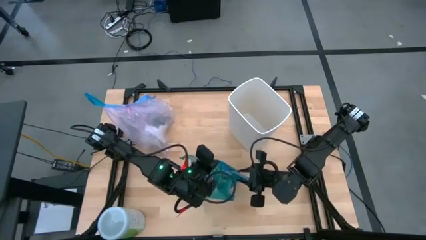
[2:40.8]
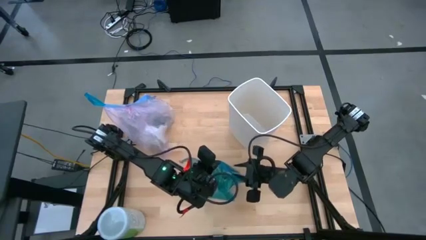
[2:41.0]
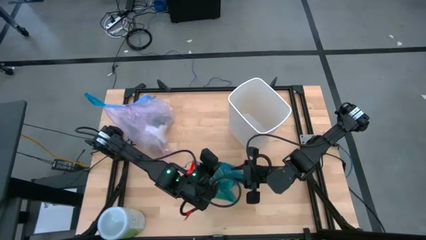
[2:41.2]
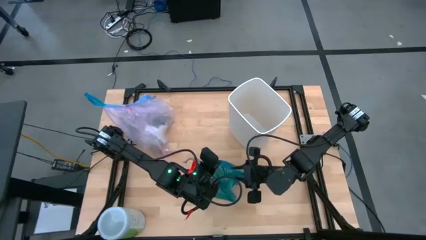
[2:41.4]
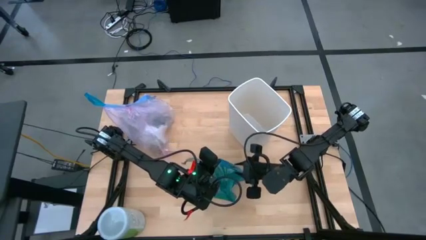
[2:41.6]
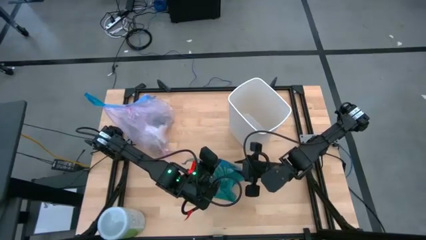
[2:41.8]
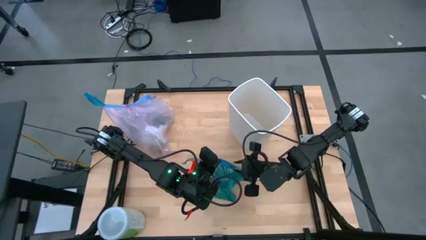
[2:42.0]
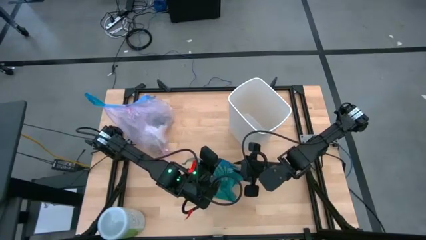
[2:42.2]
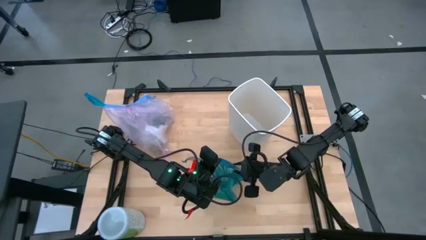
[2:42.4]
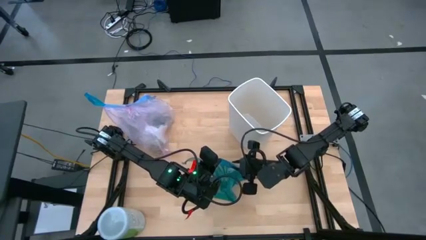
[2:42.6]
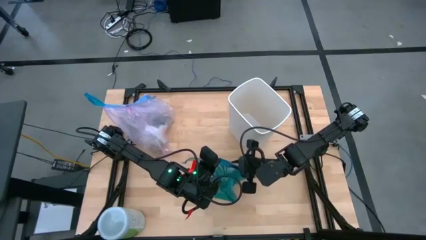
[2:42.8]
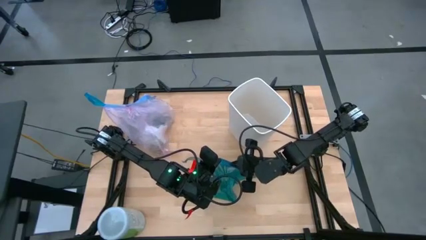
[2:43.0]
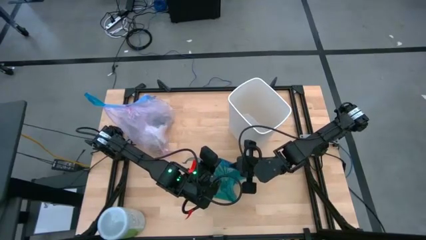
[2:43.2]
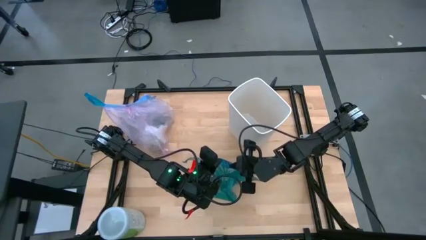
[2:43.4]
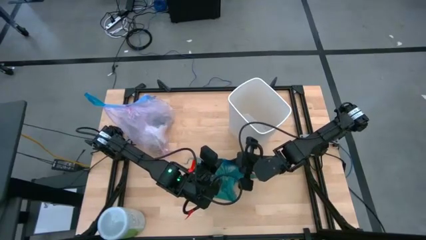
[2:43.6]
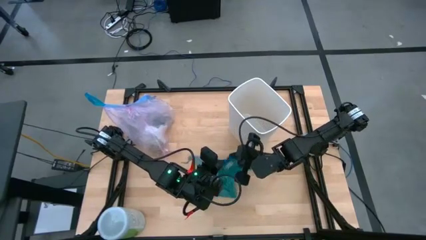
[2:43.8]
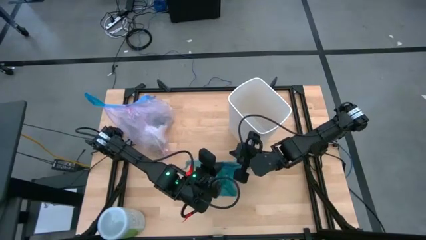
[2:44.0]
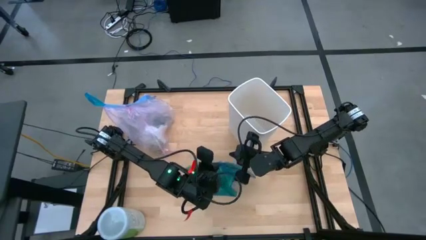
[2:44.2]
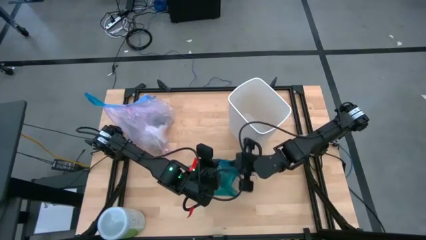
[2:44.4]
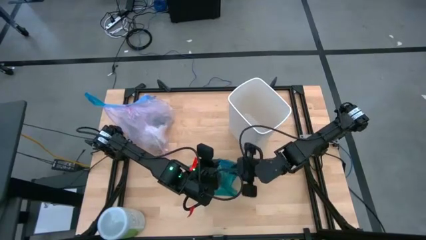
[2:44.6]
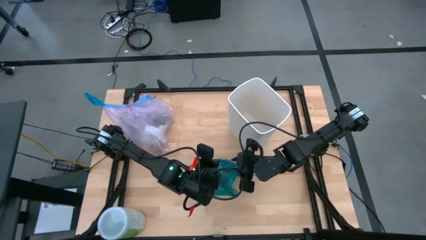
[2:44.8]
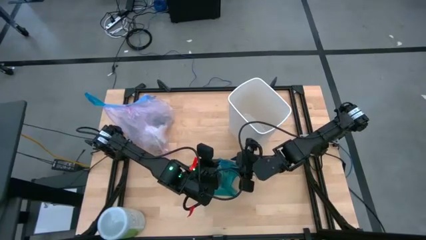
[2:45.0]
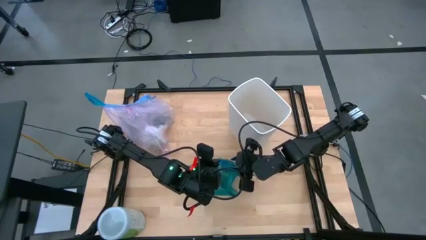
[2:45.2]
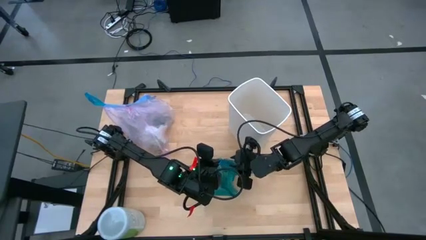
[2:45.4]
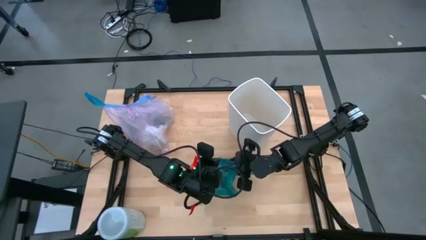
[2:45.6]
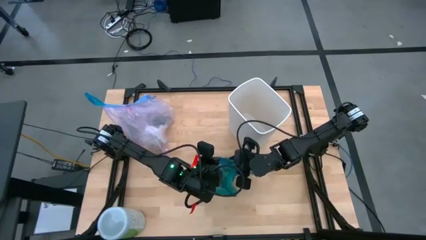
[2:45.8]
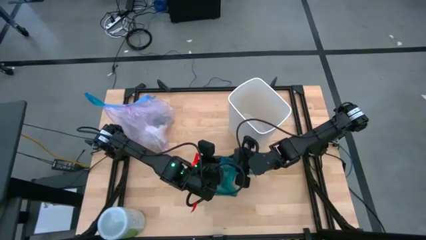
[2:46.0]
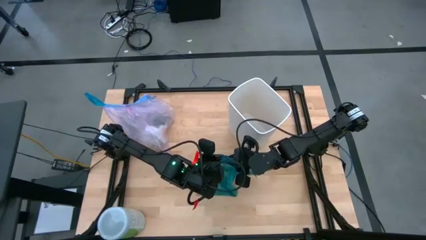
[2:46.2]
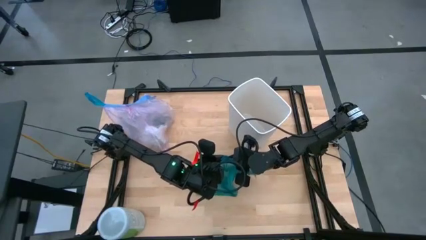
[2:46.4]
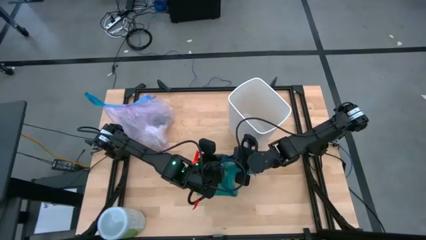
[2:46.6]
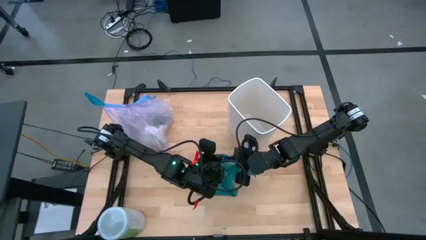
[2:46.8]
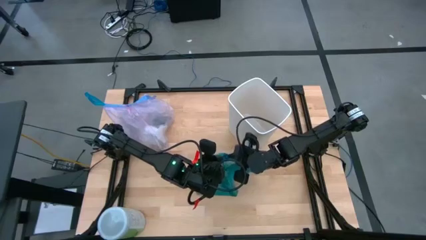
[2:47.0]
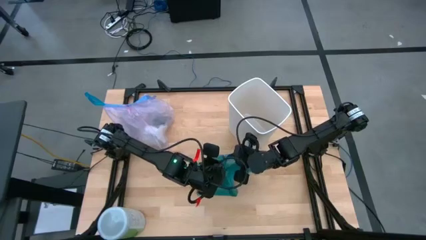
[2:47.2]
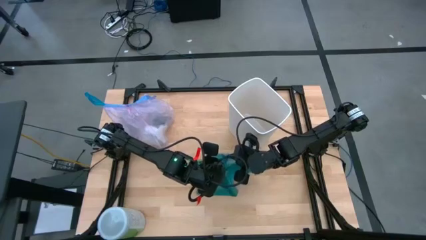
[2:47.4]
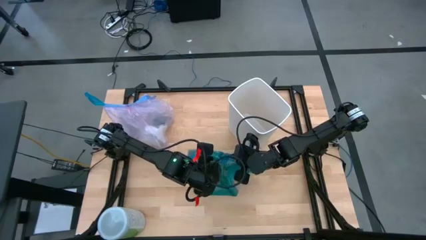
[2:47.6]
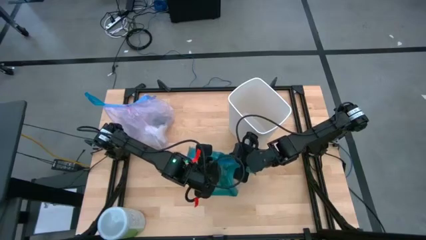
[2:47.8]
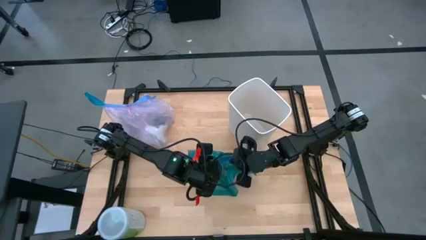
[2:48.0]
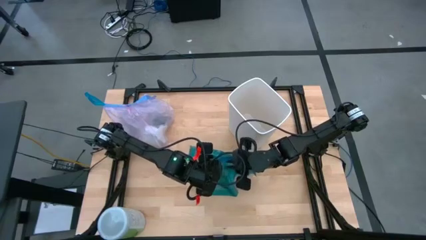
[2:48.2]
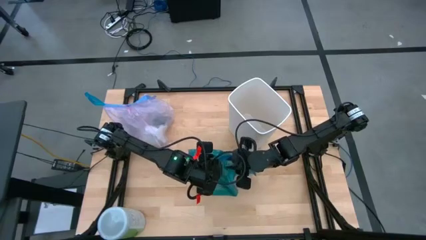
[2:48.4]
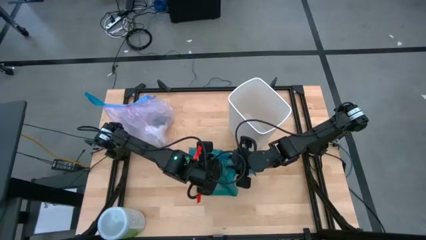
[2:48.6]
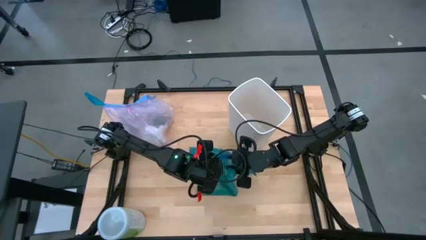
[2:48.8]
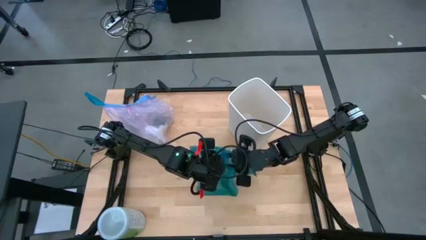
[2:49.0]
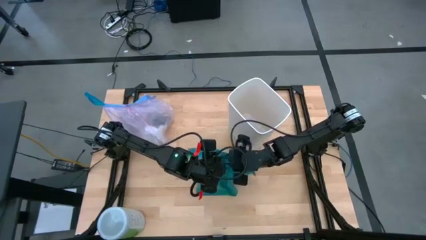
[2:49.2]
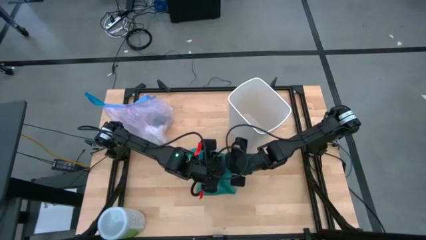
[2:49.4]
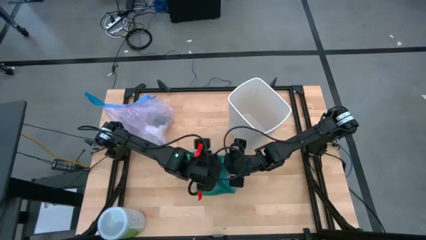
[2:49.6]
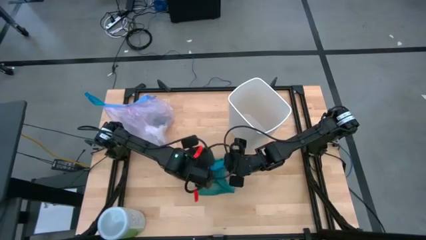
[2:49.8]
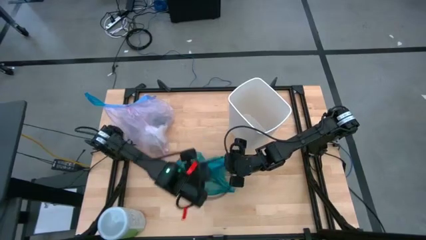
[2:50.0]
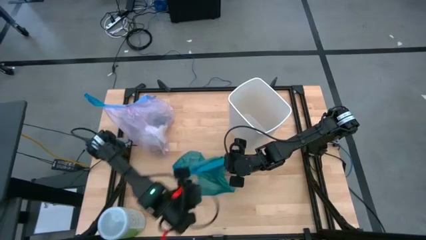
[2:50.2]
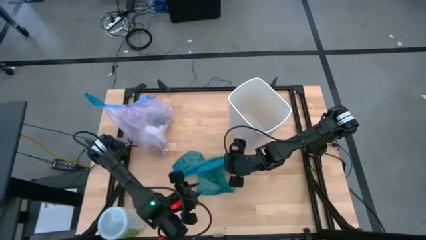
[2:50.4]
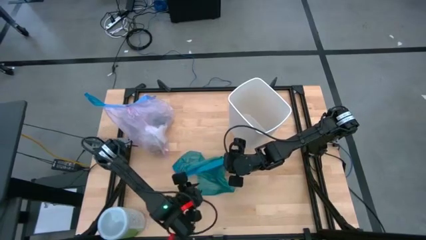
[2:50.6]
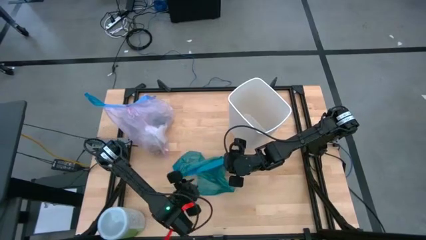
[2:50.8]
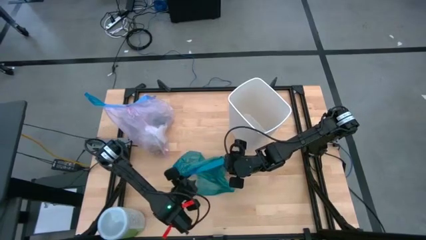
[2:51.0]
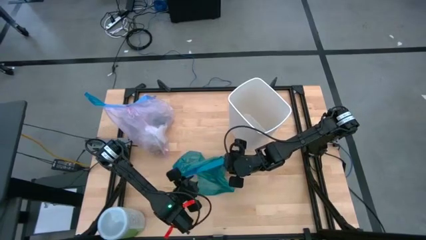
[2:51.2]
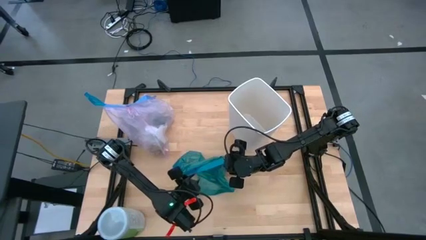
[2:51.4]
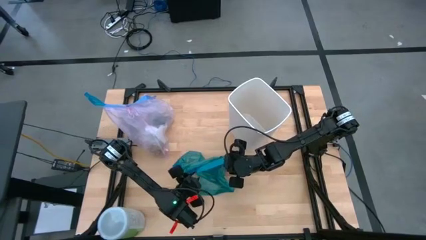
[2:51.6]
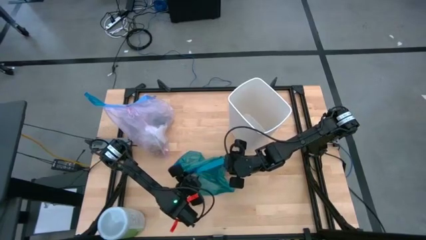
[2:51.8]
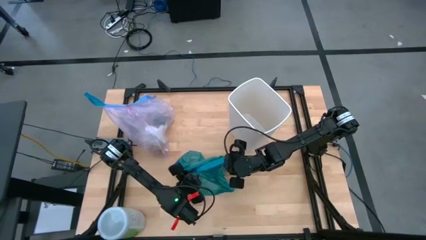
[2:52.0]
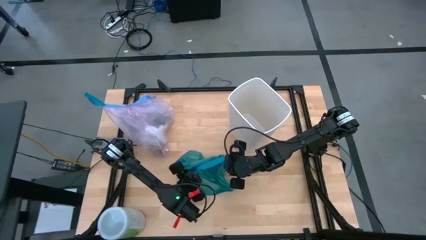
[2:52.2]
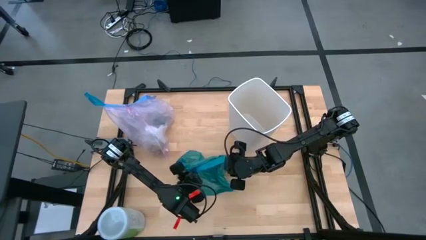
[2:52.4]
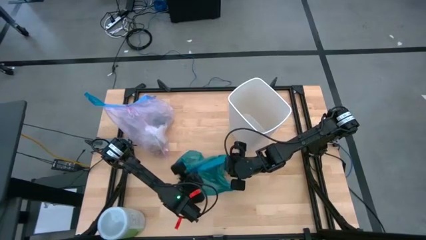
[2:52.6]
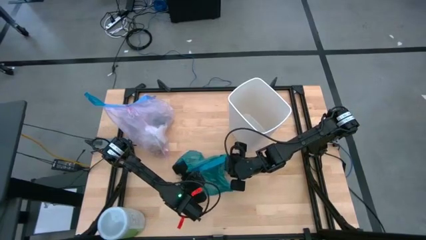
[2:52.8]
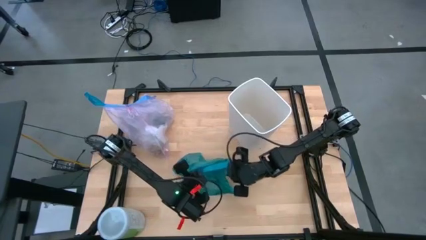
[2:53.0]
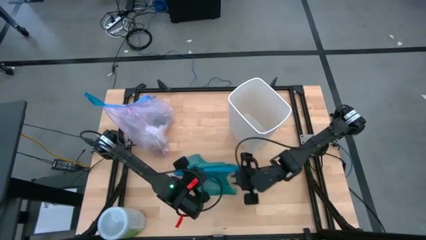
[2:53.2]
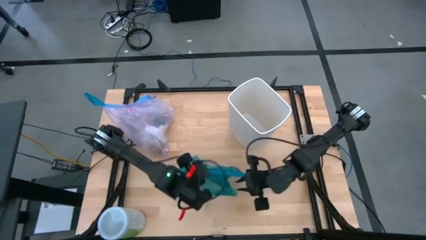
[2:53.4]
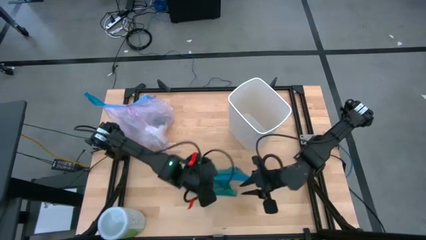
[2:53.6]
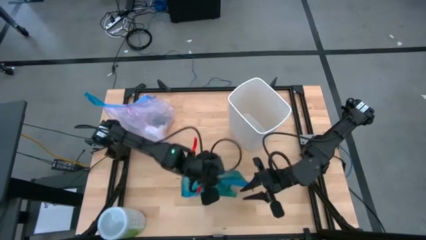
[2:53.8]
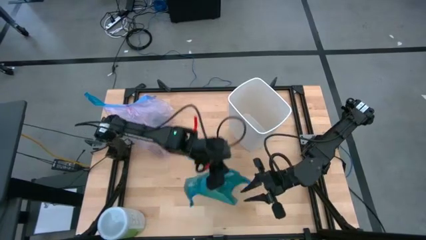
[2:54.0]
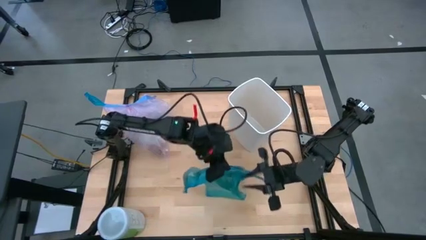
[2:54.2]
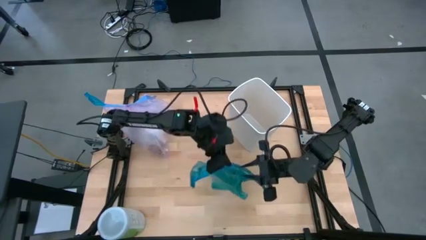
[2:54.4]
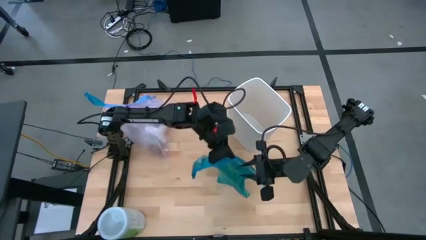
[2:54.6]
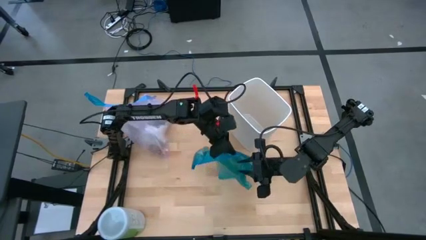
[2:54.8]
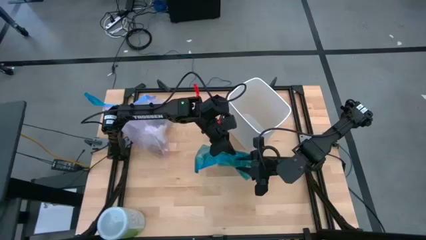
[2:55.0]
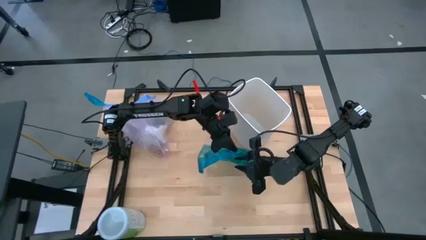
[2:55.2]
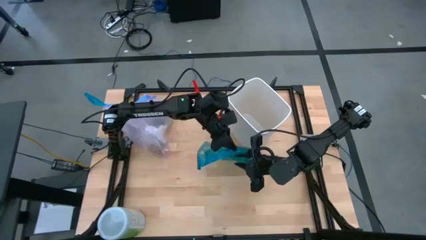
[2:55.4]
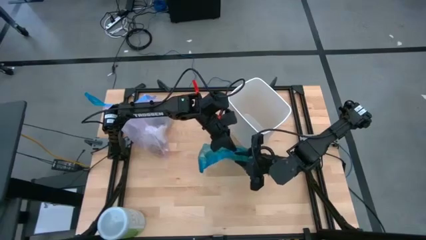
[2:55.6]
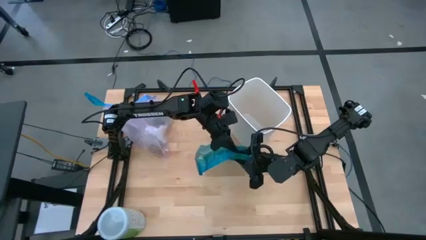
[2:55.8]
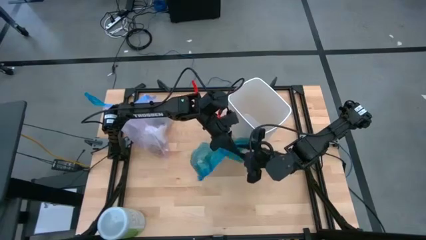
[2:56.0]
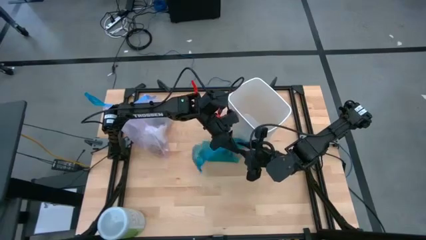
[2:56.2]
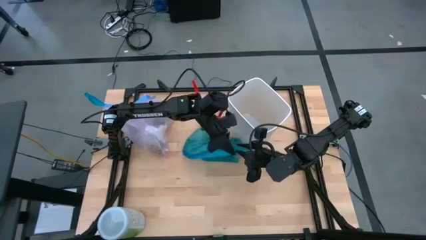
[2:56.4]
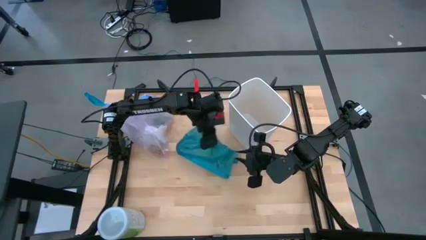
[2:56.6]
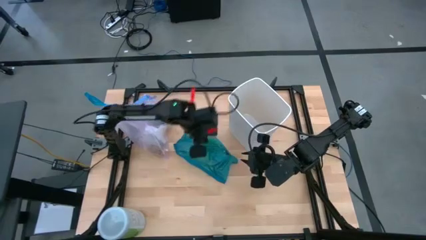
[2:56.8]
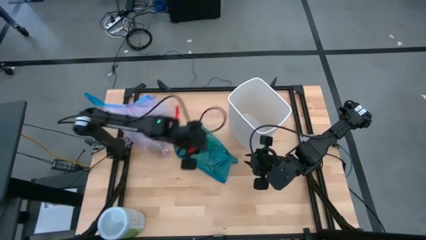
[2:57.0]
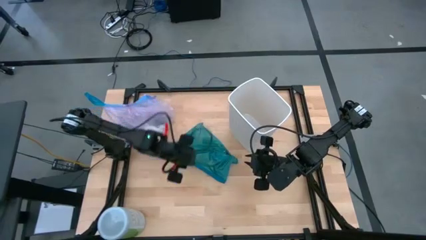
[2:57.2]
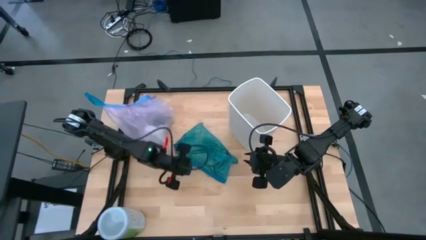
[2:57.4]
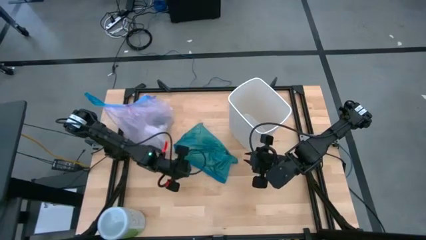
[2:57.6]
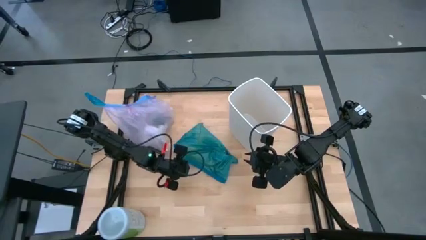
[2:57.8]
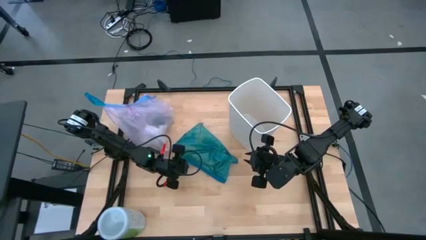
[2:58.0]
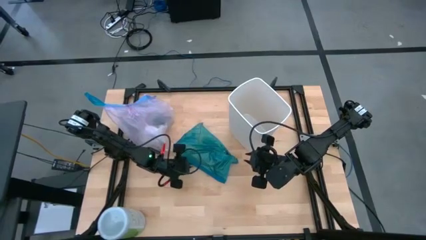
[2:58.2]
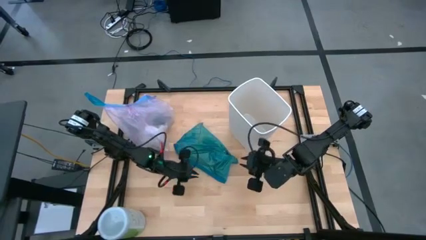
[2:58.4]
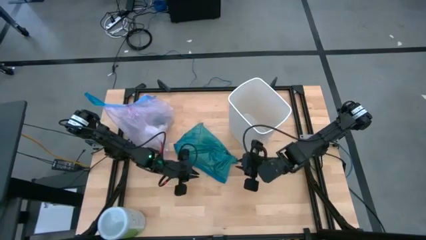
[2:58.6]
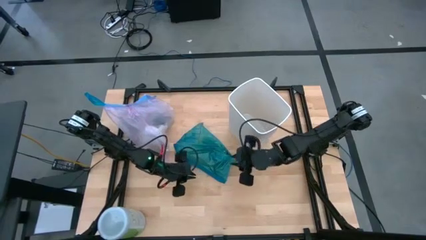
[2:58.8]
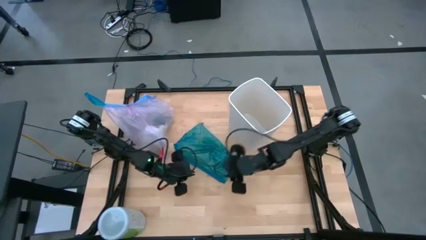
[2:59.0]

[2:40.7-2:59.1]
Task: place trash/remove bag and relplace
Put the blue trash bag into the white trash bin
